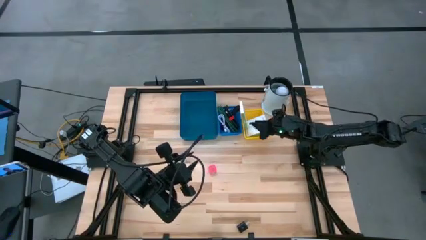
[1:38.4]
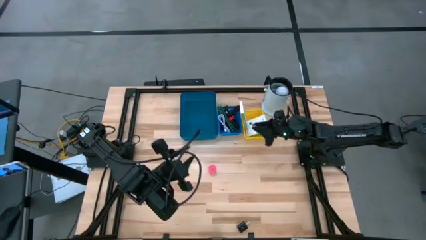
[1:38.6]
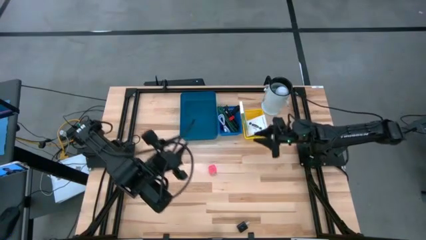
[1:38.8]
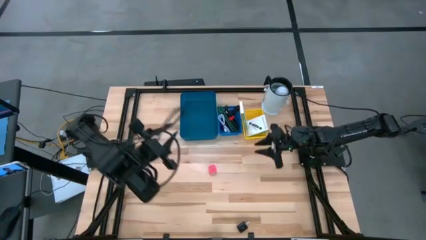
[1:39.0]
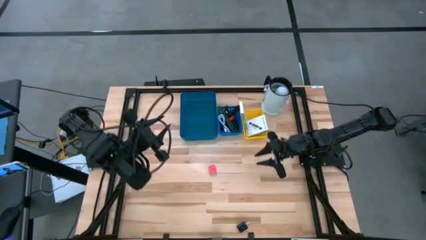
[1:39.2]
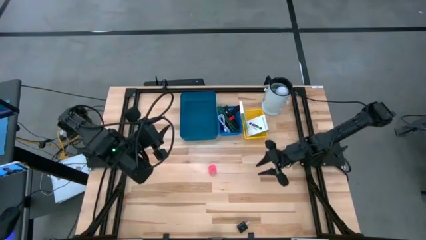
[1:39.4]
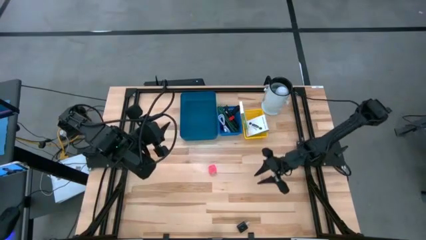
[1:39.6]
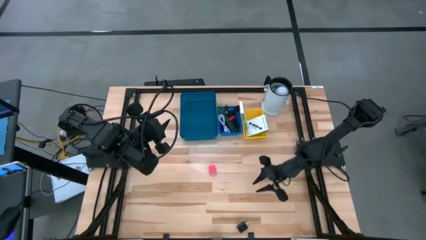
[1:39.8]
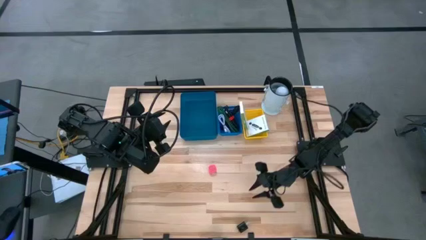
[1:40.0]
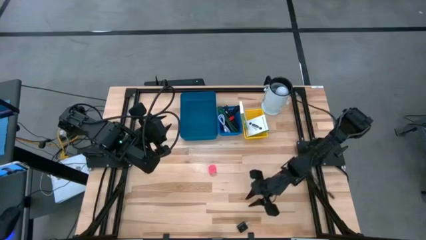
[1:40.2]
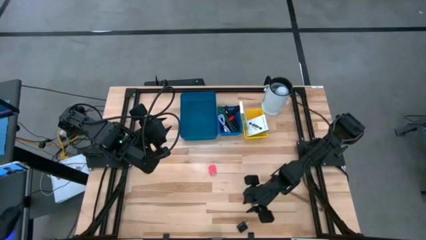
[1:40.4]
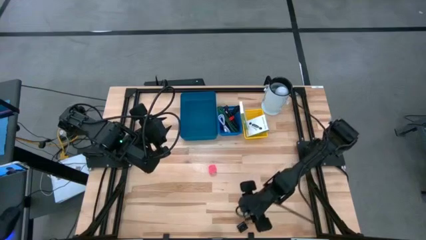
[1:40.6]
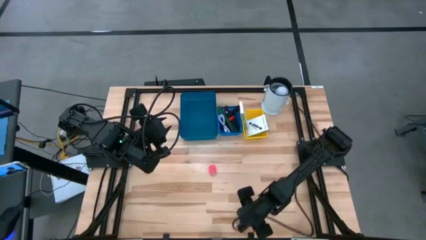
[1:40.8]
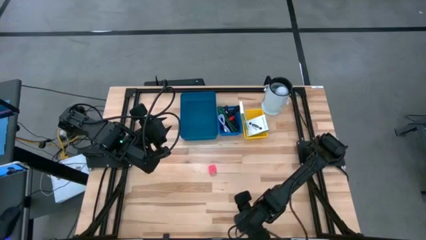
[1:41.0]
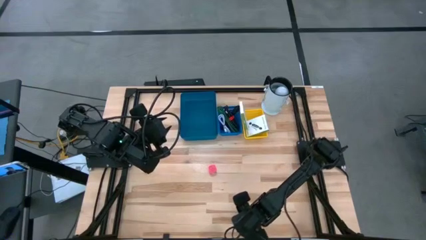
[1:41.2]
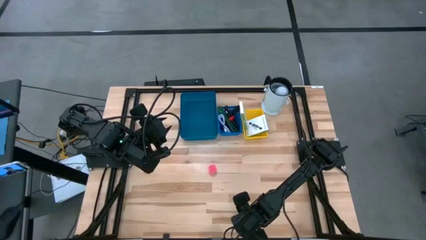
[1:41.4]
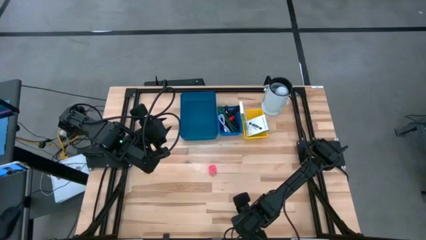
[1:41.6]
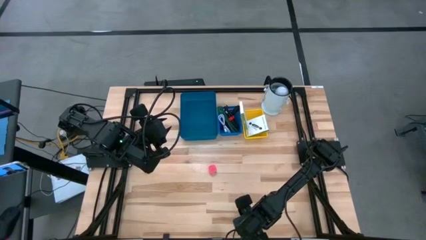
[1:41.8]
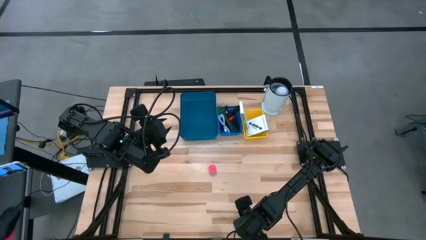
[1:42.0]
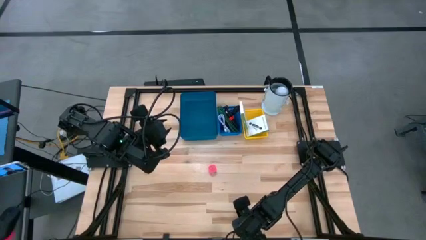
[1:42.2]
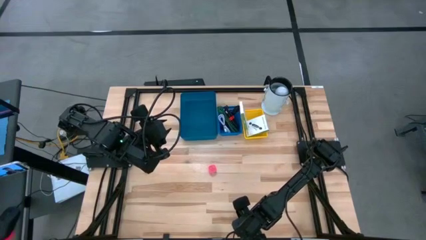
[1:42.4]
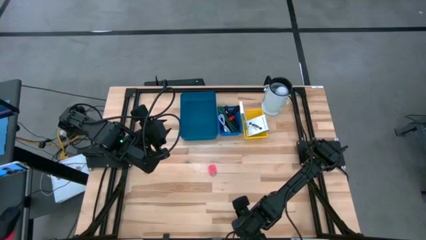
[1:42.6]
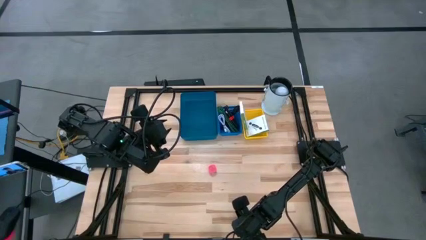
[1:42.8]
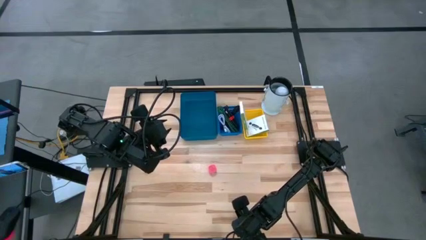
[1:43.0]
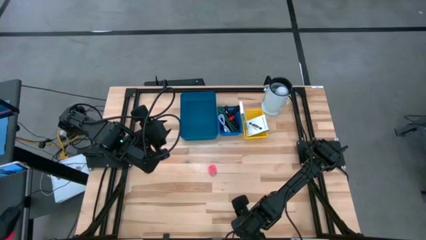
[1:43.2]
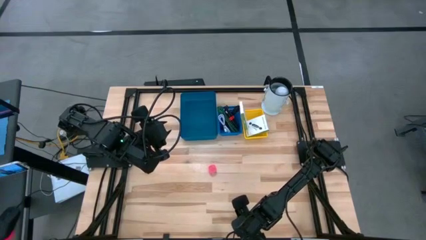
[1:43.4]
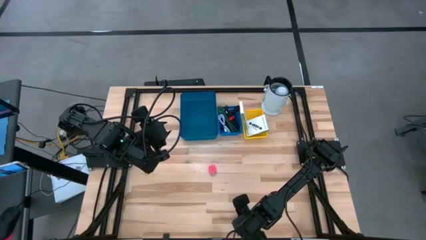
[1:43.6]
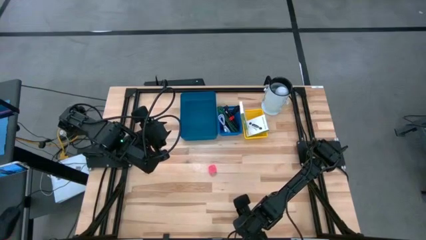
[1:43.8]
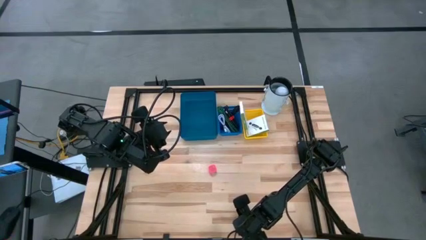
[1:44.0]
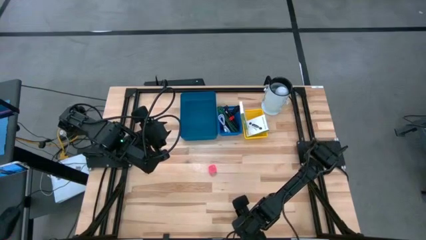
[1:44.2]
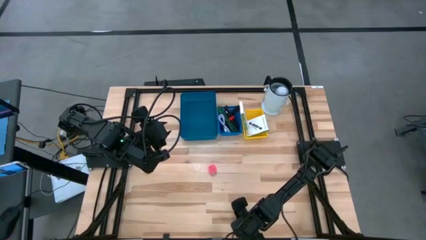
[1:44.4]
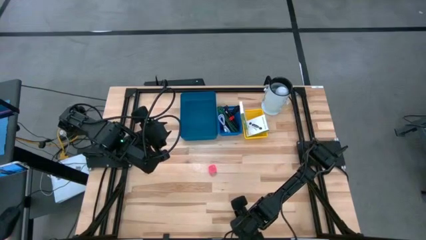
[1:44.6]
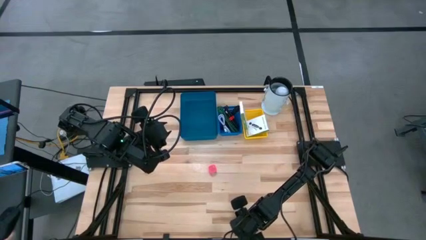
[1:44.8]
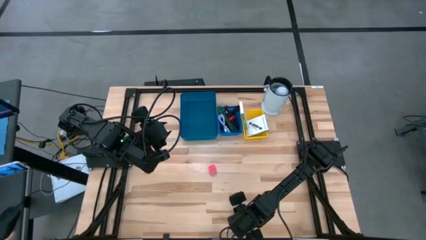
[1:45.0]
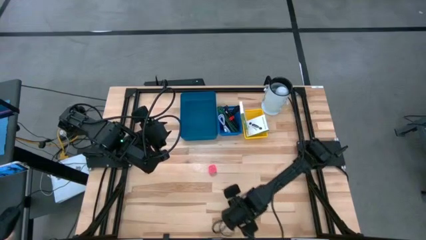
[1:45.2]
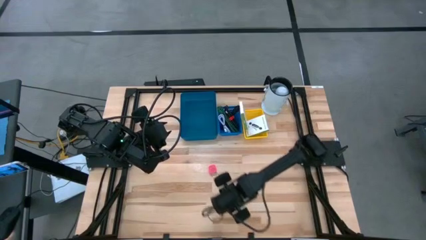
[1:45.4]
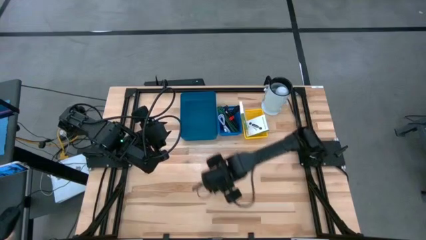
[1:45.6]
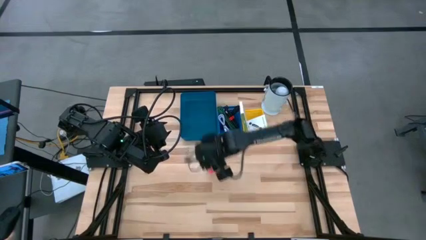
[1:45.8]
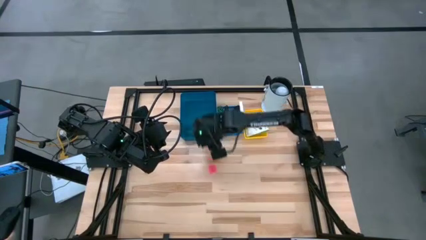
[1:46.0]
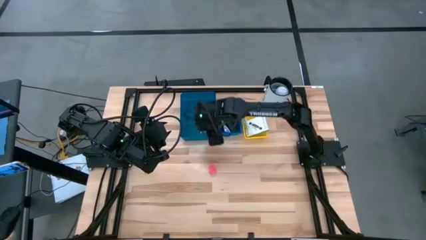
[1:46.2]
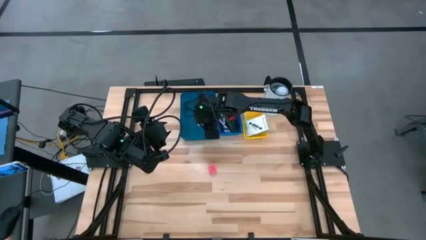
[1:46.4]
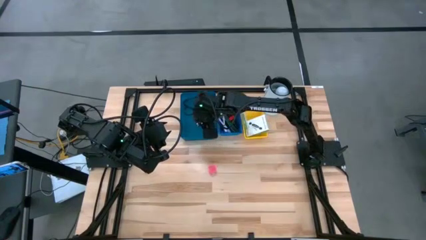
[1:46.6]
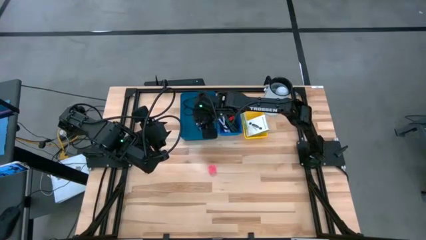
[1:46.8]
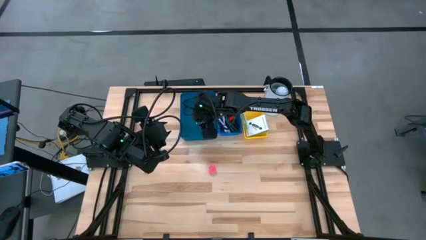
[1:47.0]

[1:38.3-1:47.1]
Task: Pick and place items into bin
Put the black charger adapter into the blue bin

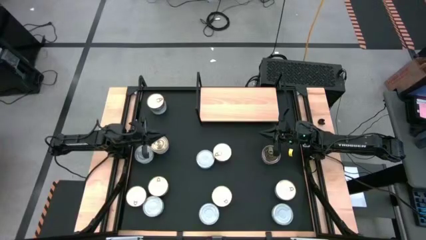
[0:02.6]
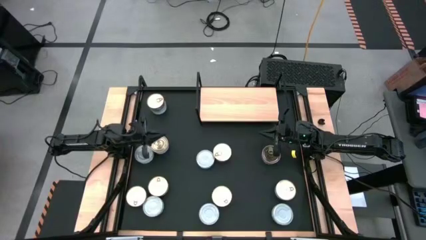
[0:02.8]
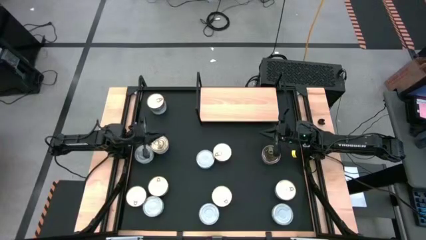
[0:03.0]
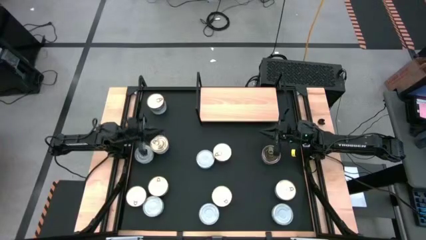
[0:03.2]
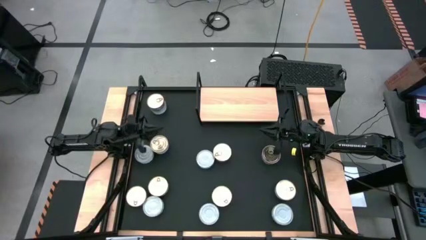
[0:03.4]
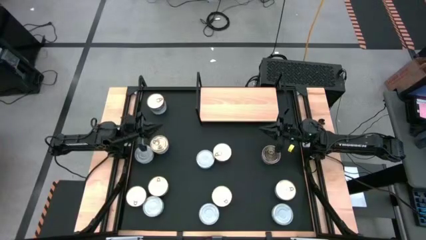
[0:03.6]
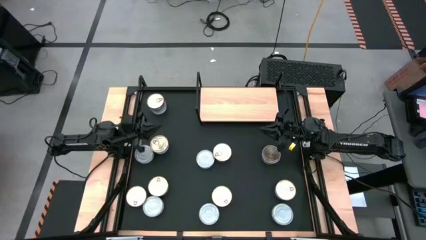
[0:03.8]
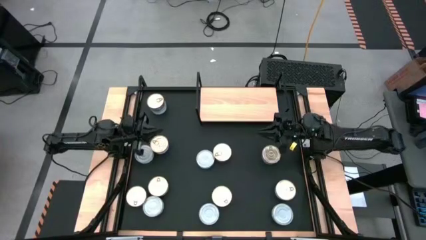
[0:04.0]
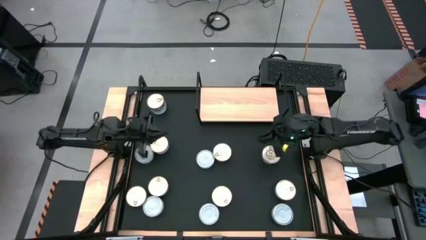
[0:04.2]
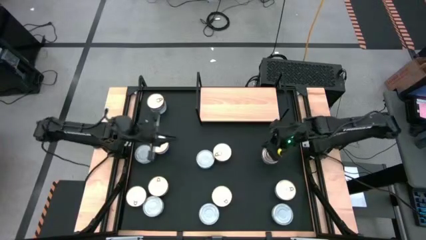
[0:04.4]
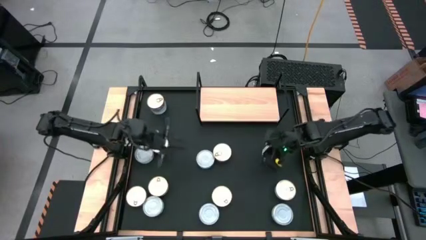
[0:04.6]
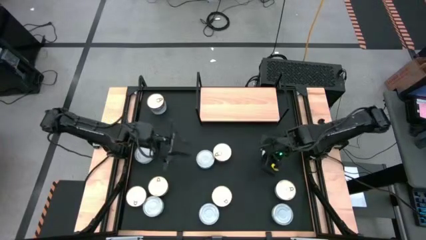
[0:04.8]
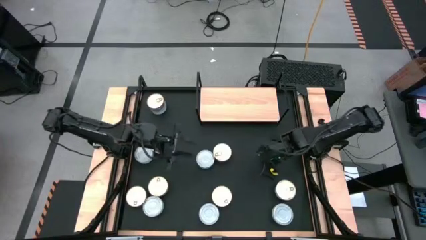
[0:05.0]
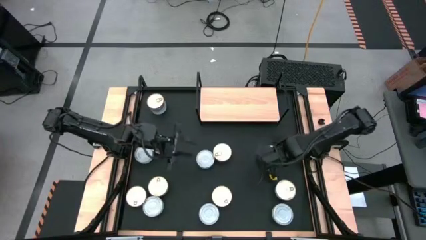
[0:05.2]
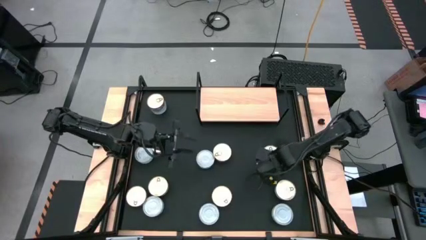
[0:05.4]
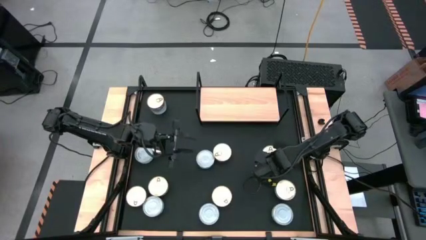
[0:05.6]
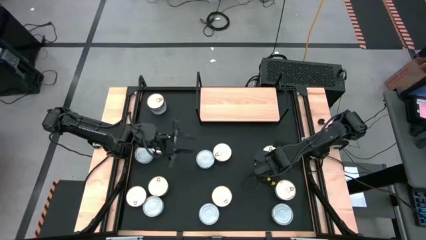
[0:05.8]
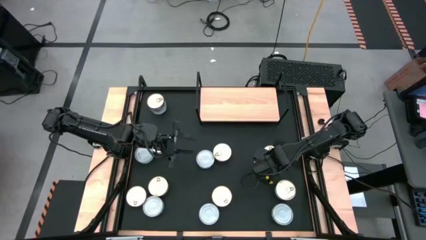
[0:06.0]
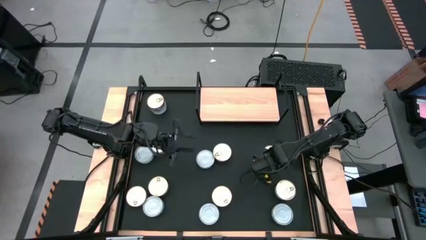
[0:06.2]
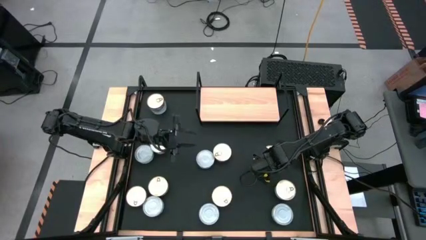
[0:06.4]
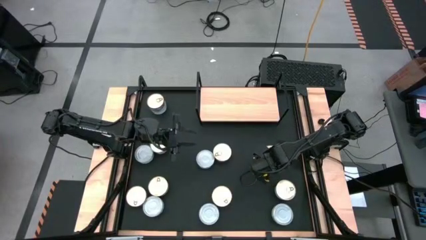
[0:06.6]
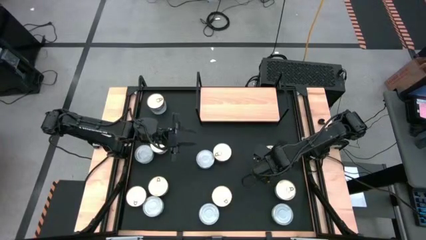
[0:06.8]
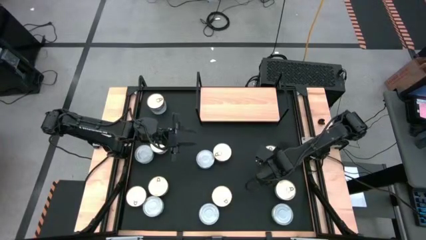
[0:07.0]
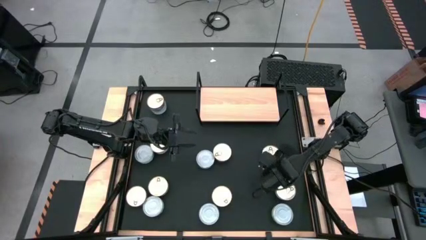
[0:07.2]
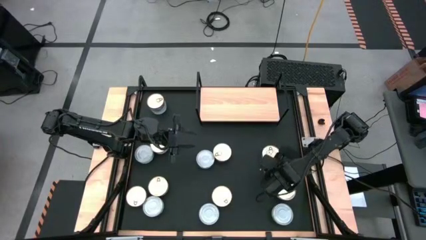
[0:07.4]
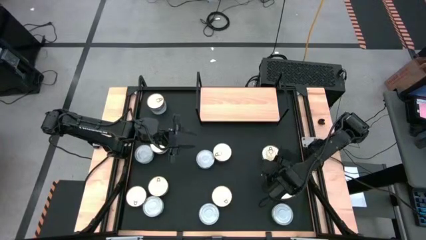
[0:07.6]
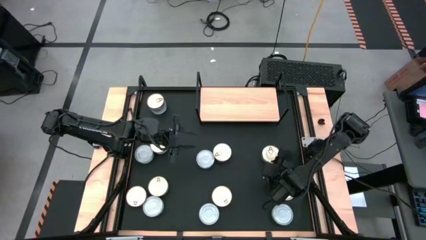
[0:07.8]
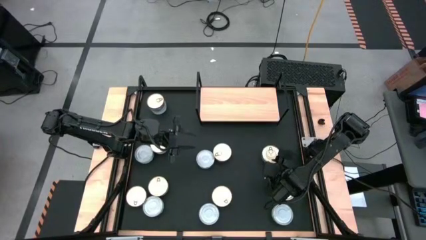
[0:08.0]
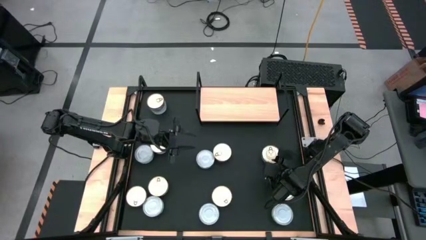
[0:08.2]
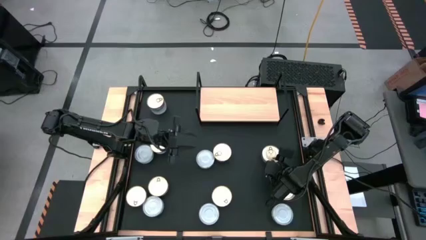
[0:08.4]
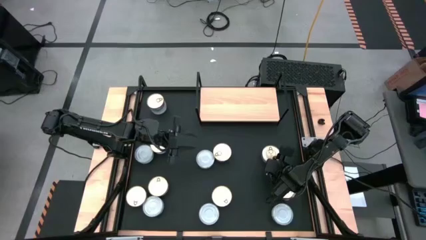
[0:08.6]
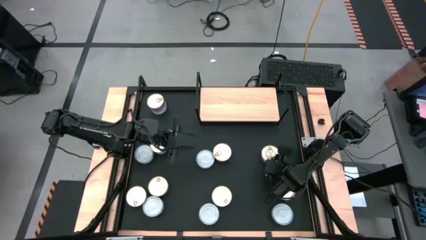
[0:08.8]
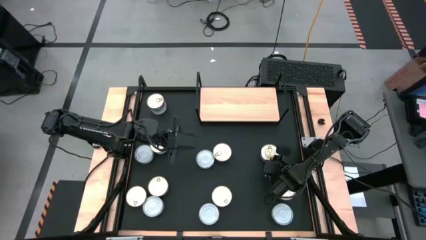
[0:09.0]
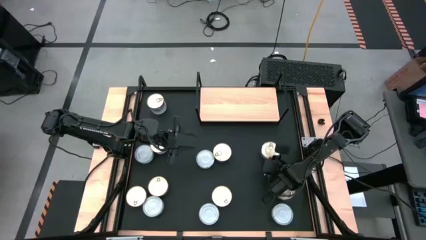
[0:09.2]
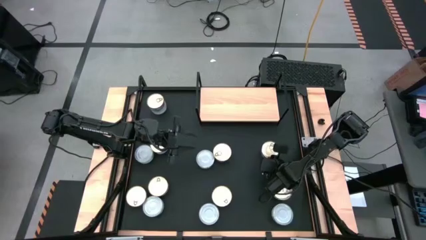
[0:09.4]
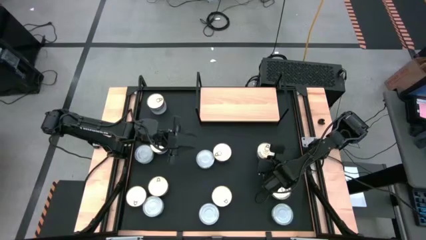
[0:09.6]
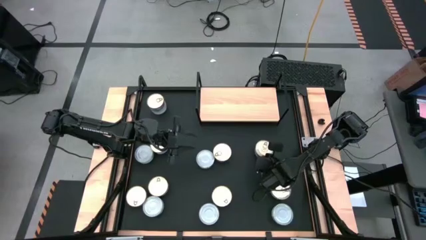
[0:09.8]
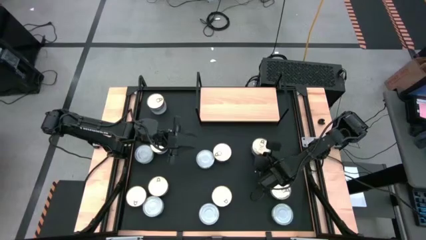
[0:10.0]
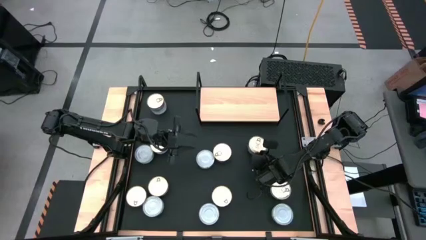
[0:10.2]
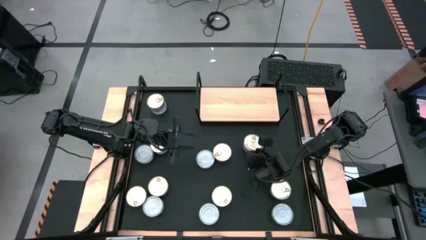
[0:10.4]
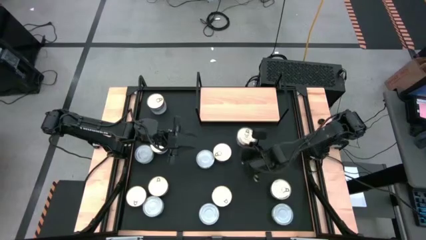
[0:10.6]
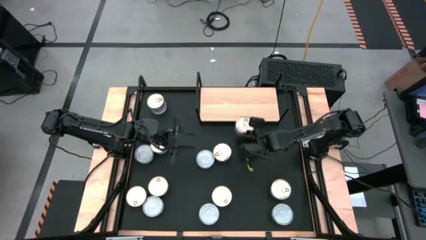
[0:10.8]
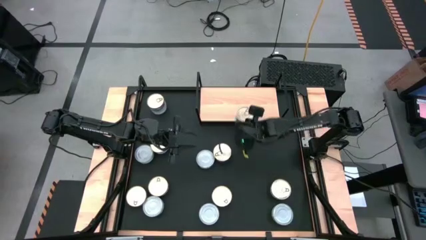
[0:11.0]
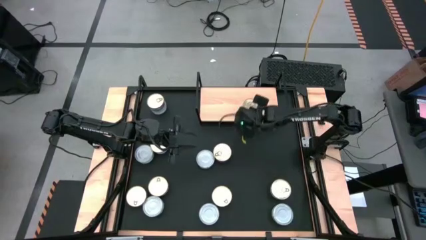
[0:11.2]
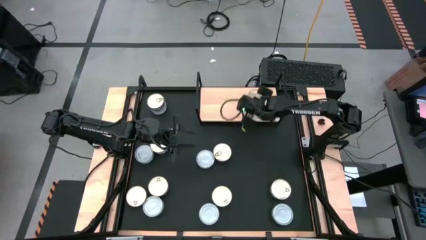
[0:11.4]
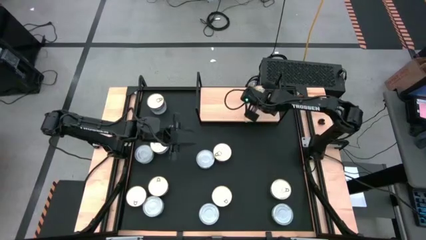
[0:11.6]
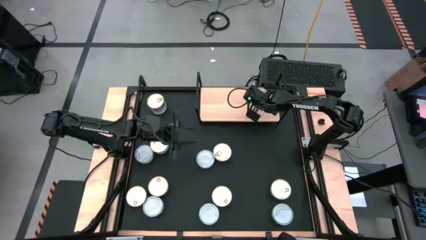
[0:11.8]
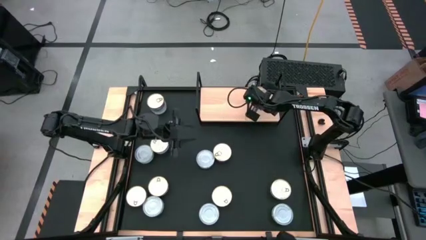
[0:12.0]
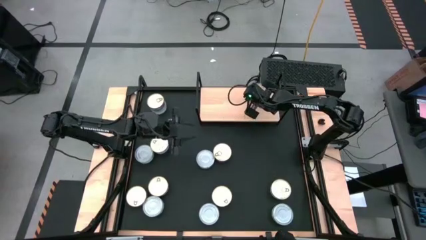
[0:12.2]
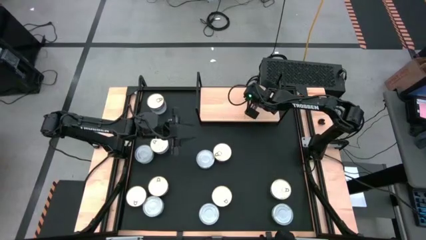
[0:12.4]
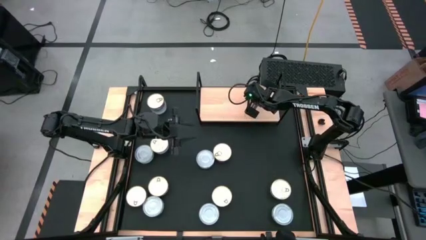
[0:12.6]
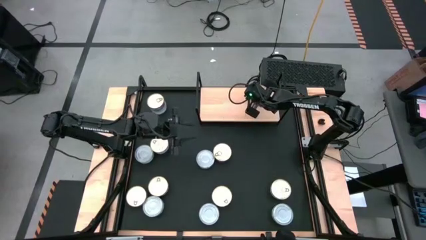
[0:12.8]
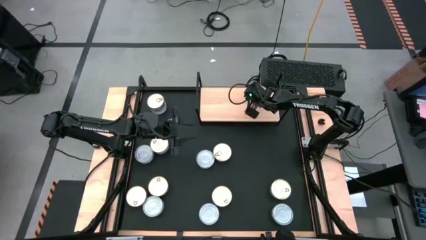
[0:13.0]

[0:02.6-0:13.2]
Task: Stack canned seafood by type on shelf
Put the blue pink tuna can on the shelf
